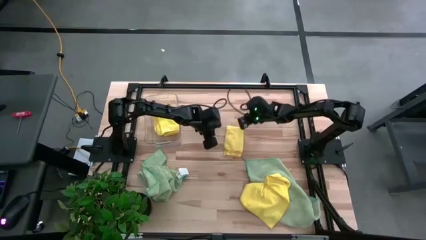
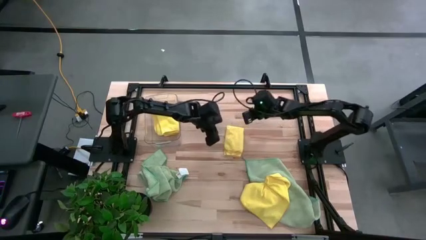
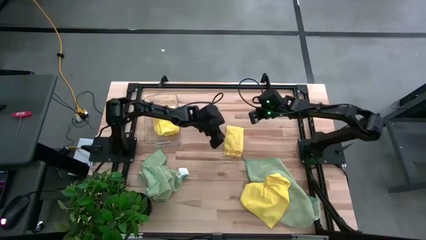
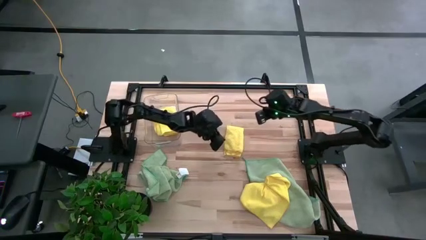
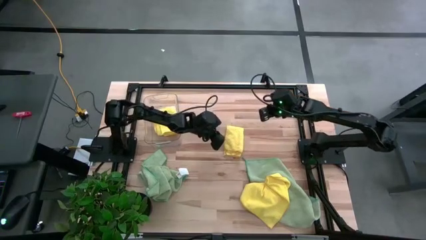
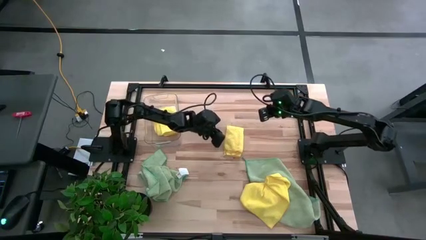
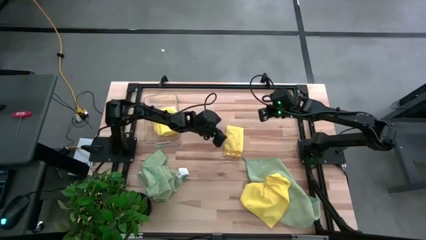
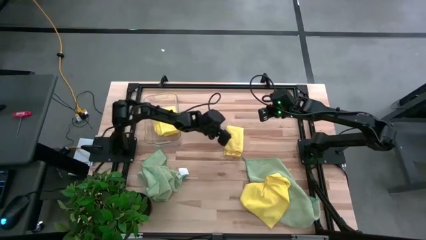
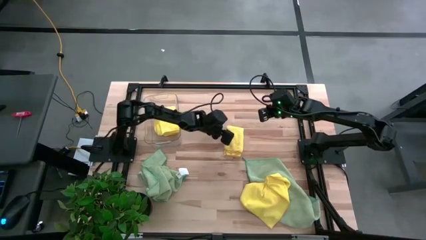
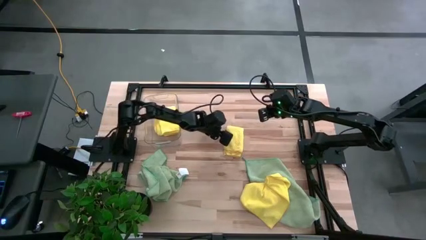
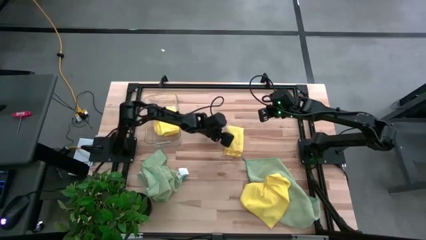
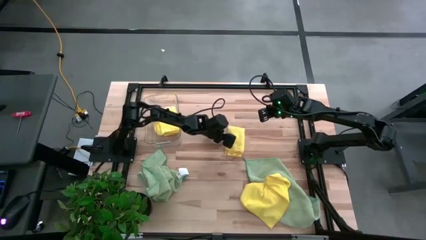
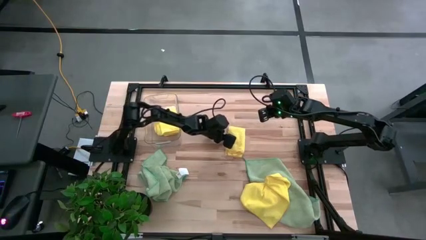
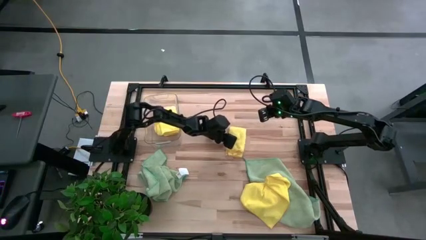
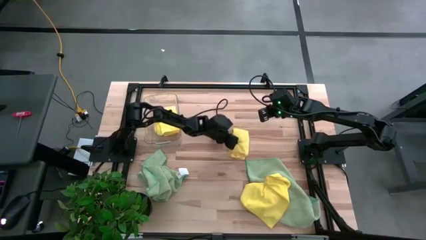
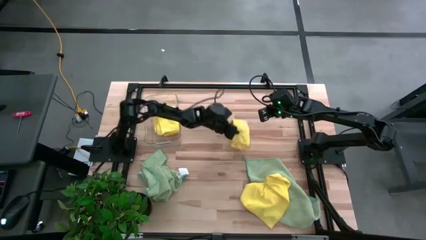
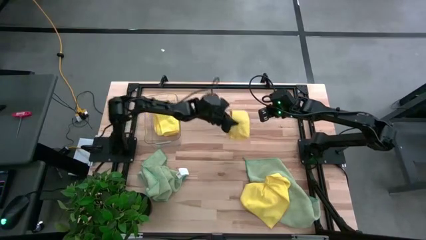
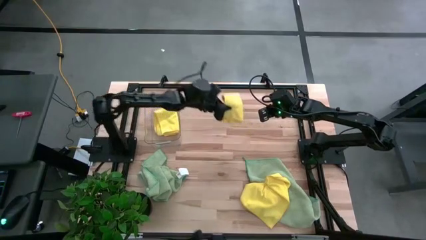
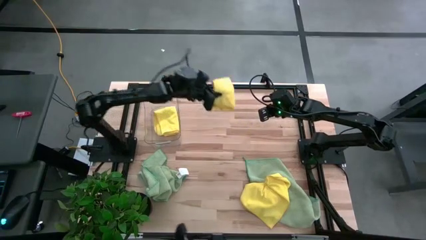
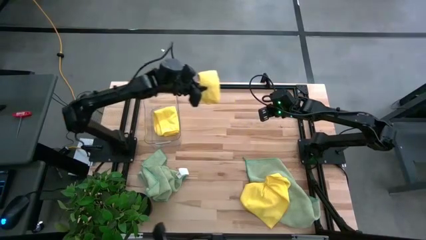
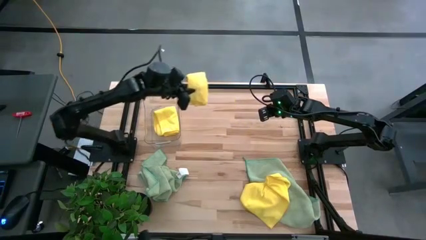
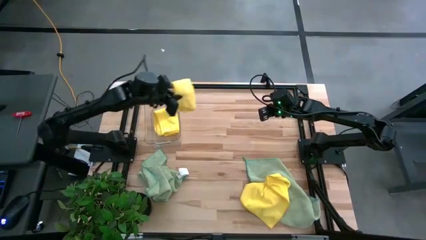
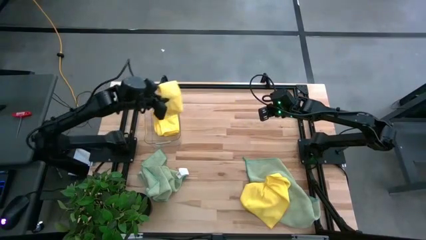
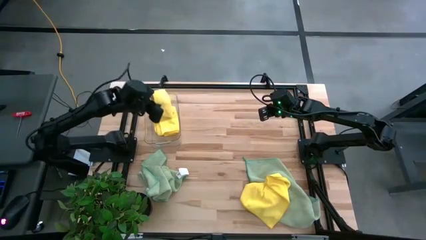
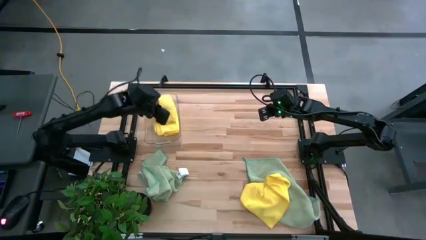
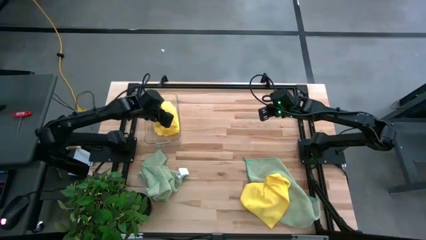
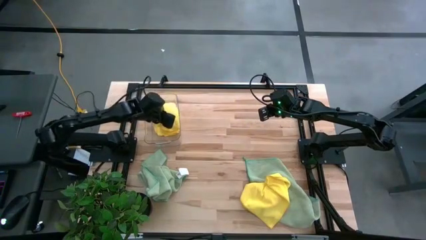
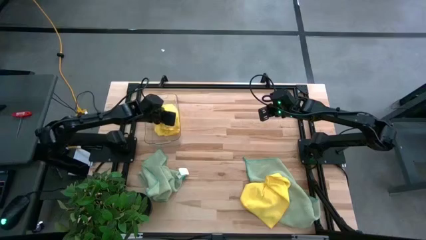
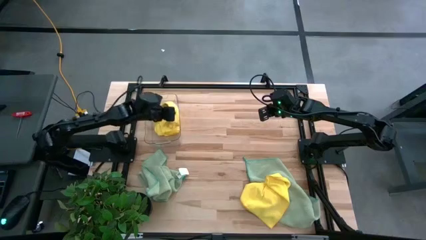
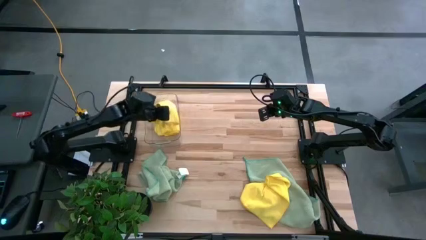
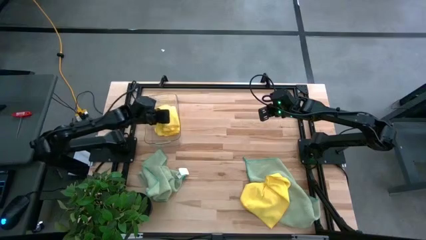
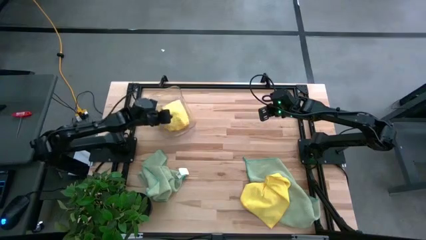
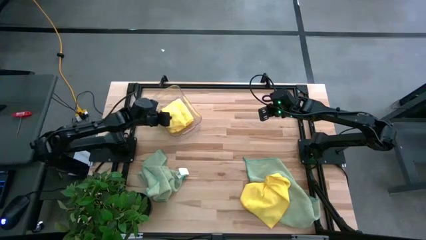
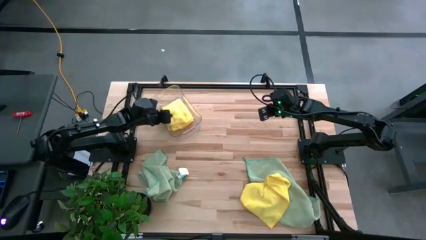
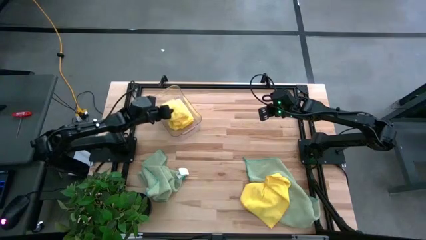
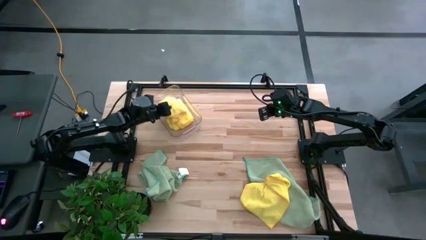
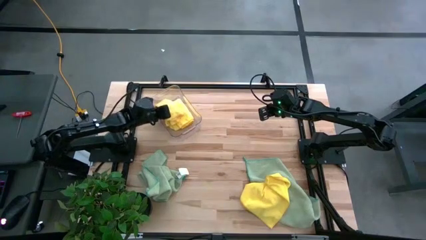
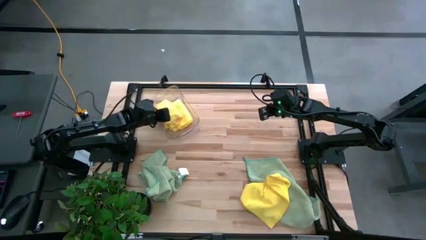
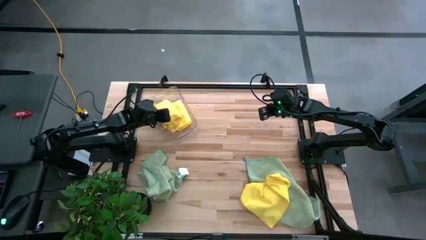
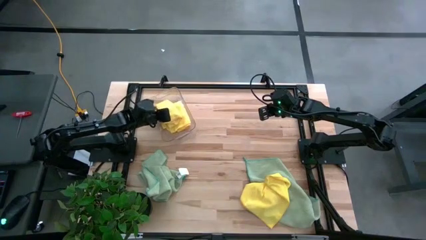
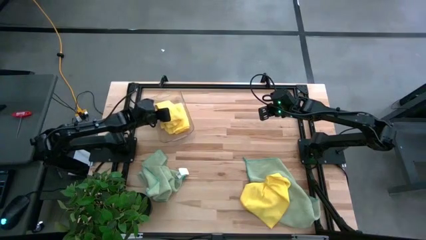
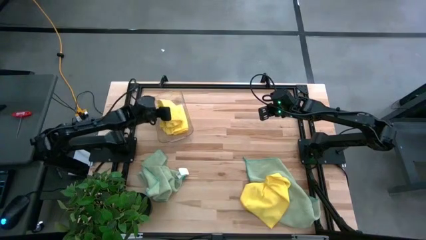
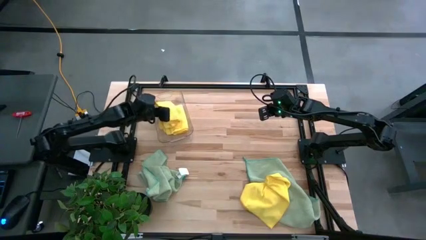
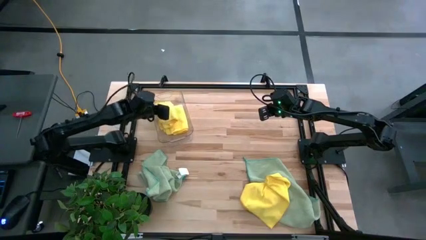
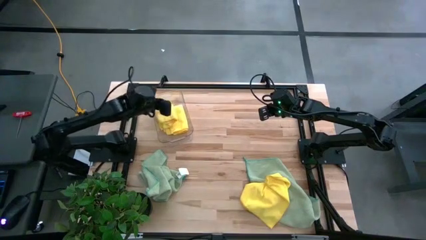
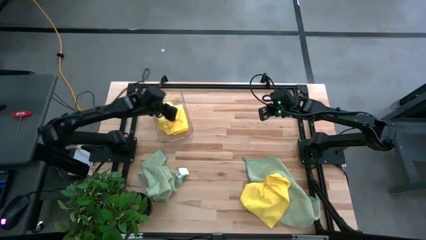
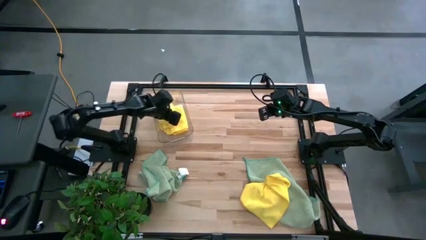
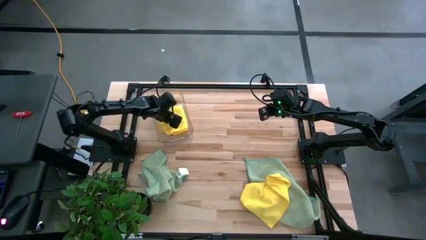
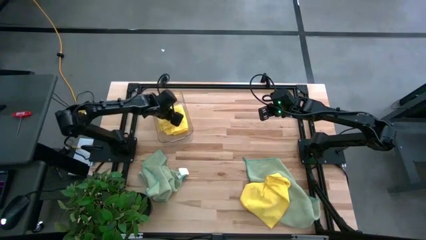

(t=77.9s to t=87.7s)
Task: Fold microfiber towels
Put the top folded yellow towel into the transparent bin

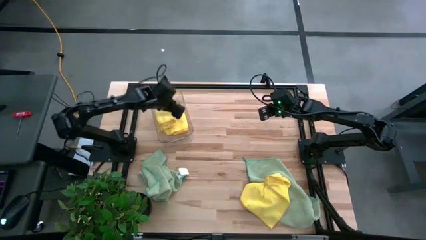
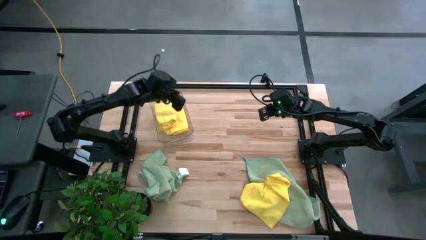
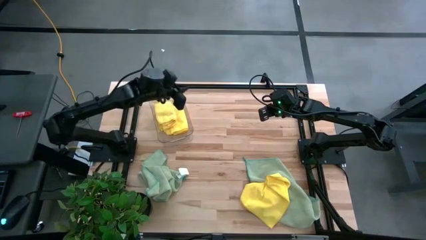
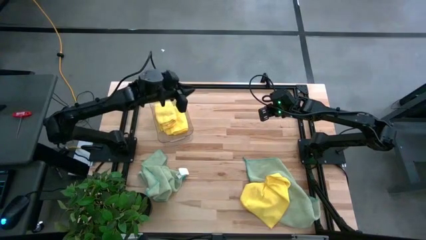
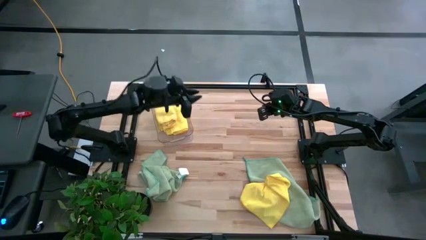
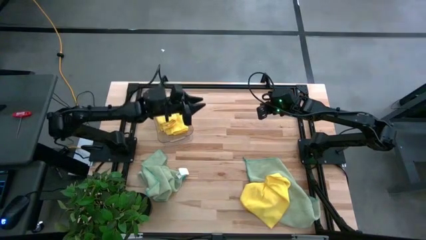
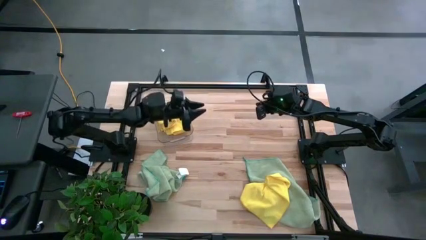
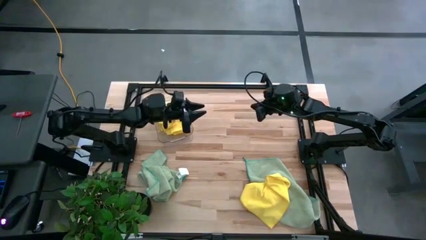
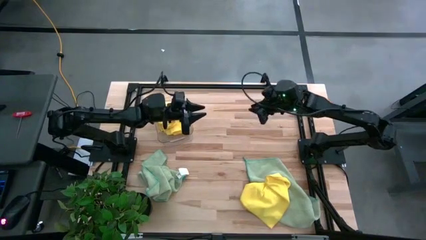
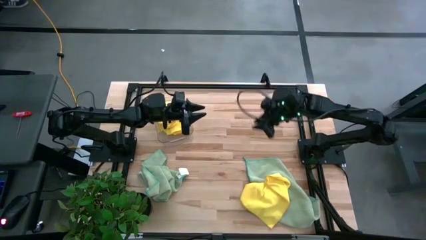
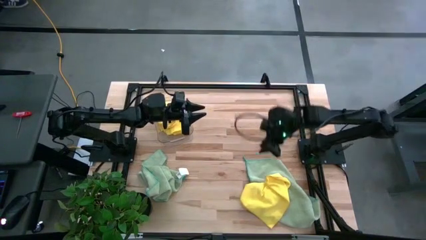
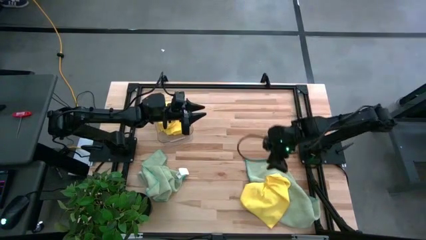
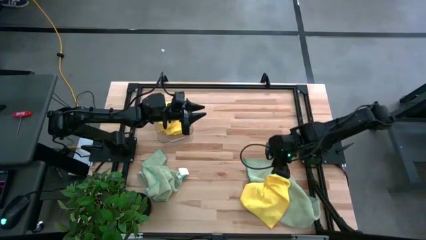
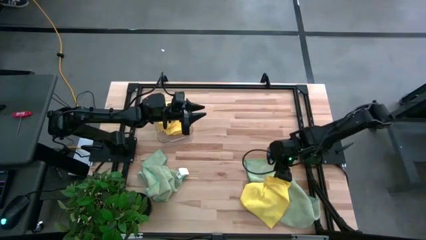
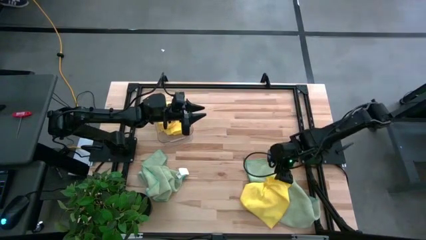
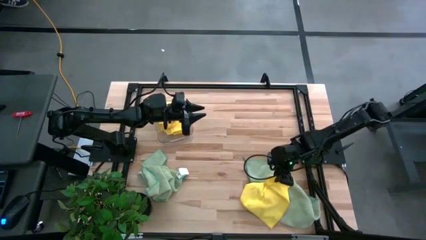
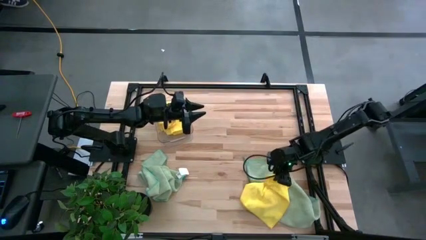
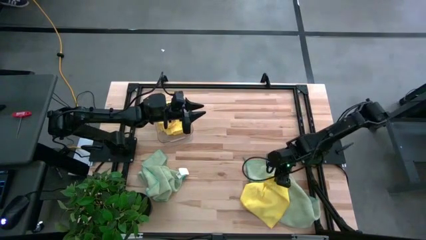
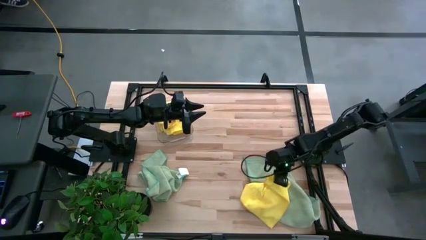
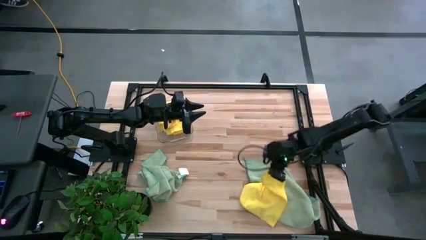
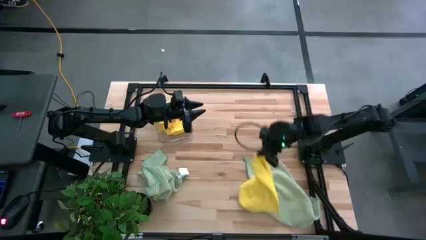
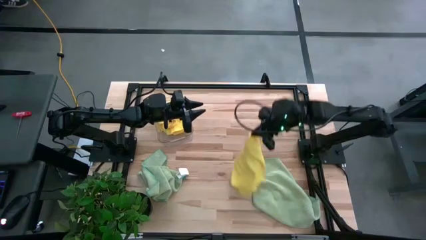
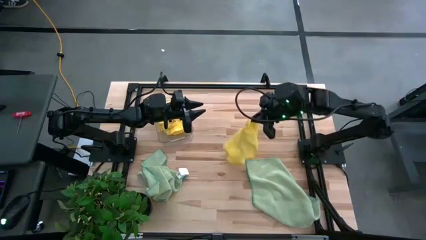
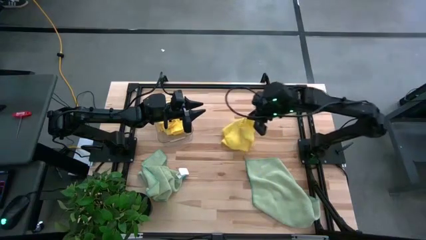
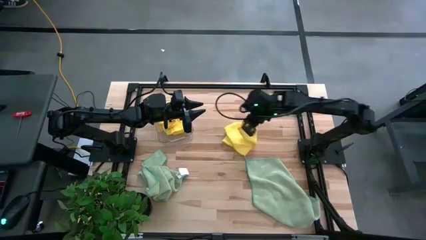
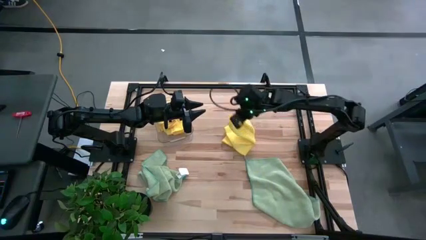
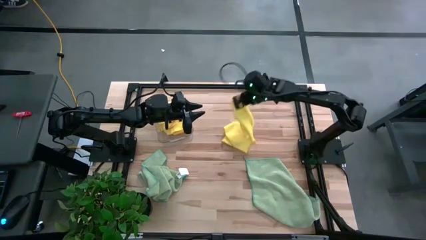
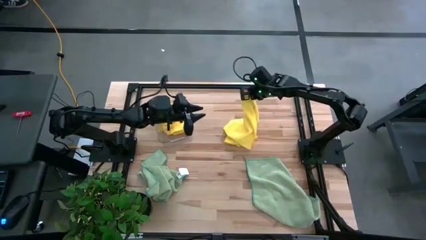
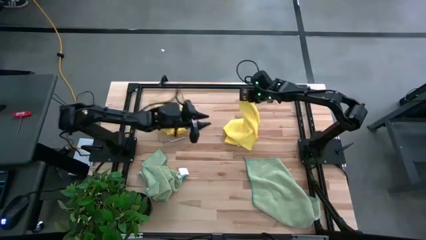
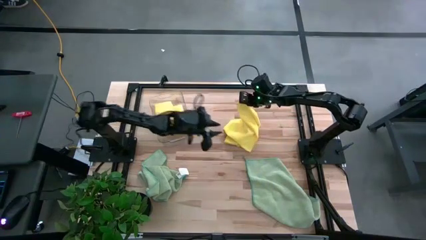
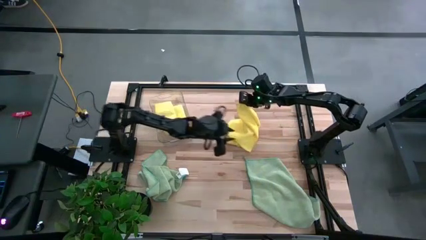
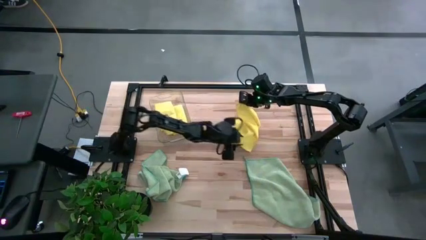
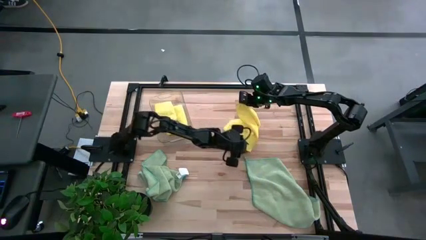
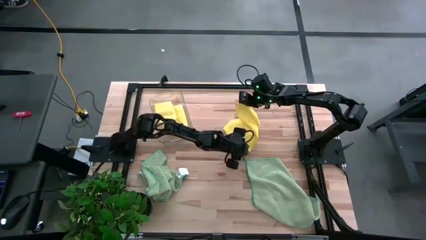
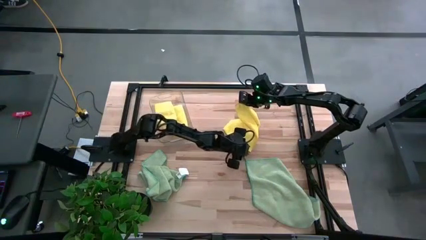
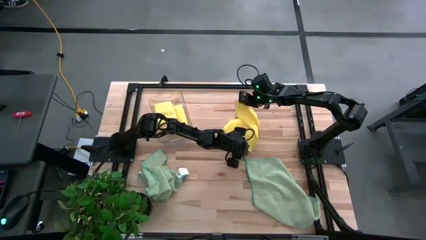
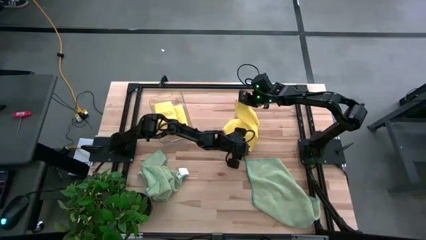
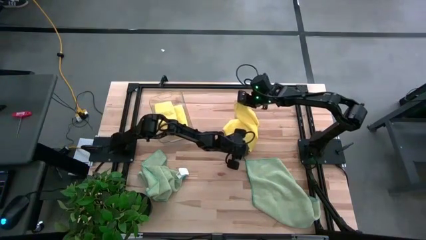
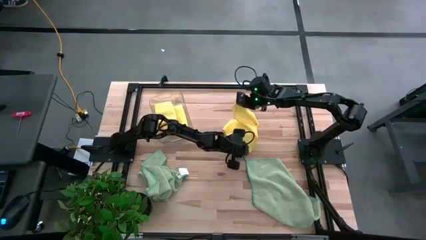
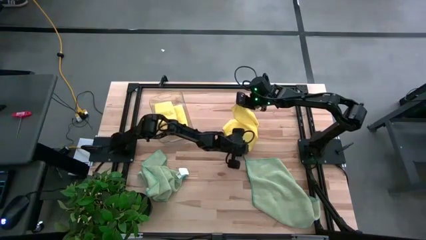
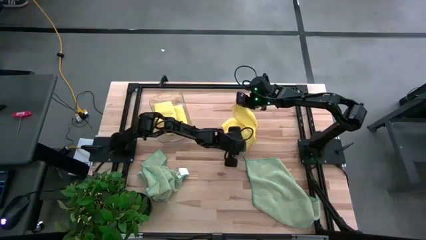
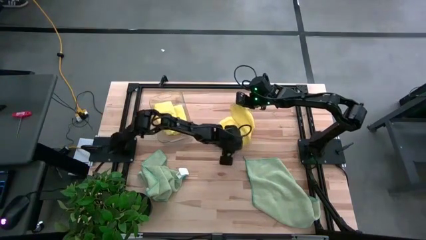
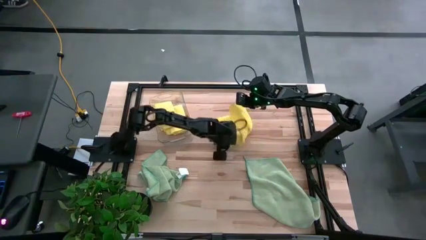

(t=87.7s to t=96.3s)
Fold the yellow towel
